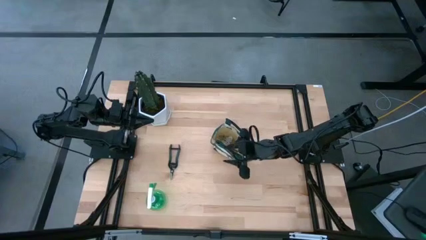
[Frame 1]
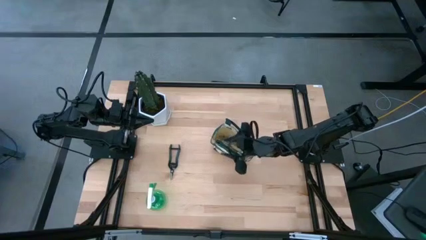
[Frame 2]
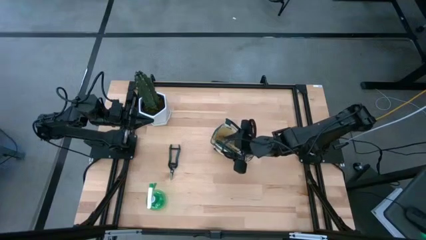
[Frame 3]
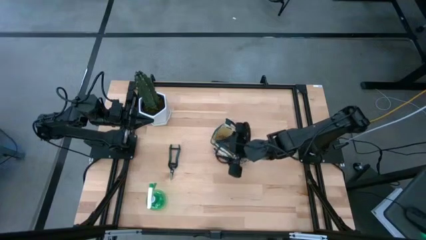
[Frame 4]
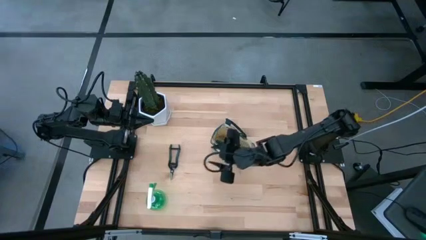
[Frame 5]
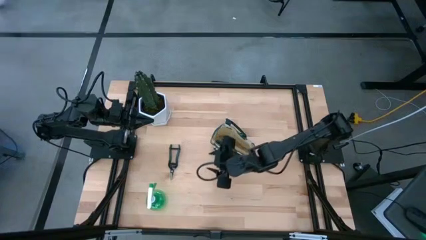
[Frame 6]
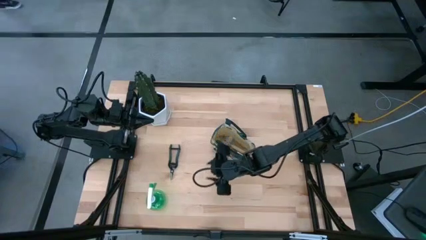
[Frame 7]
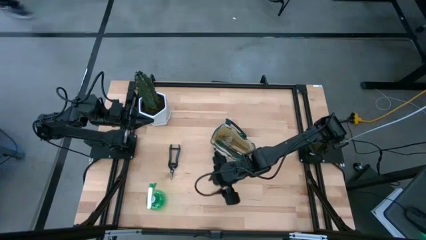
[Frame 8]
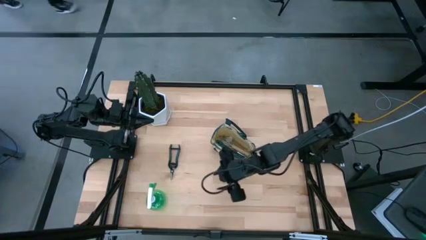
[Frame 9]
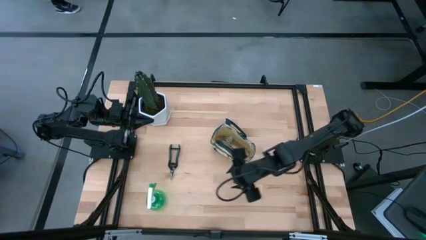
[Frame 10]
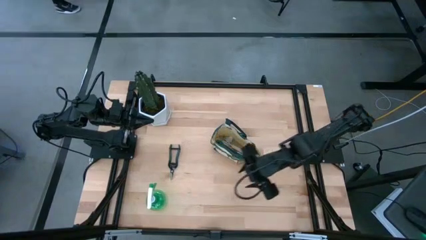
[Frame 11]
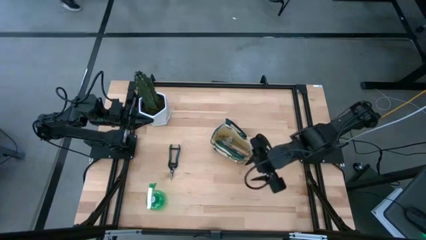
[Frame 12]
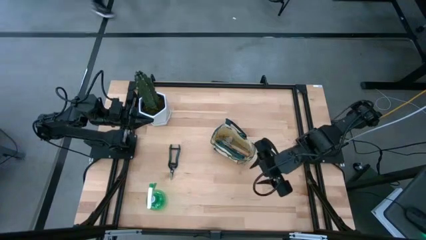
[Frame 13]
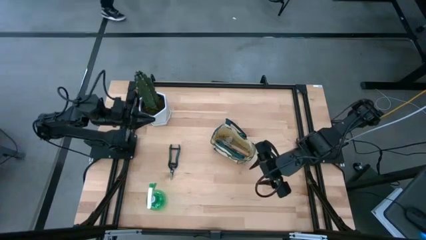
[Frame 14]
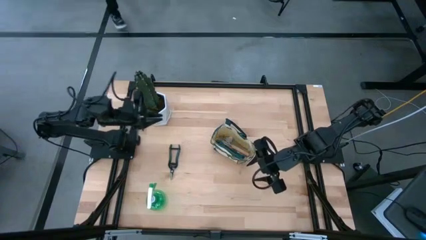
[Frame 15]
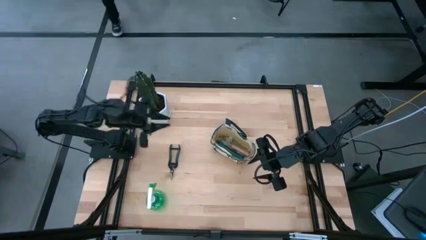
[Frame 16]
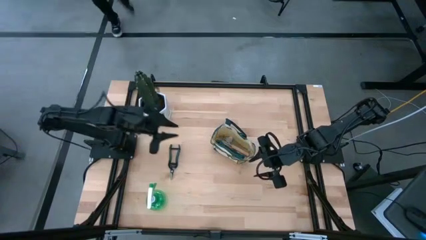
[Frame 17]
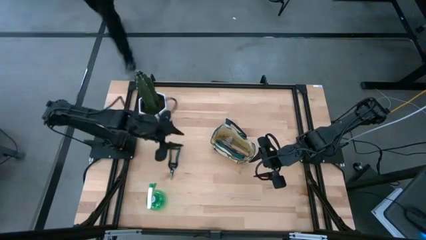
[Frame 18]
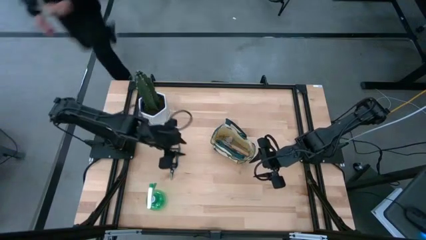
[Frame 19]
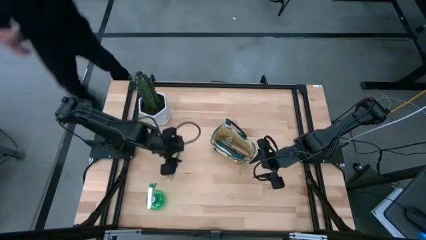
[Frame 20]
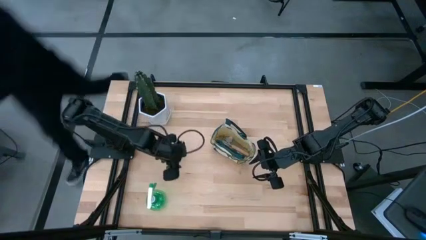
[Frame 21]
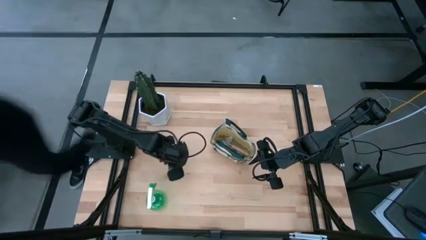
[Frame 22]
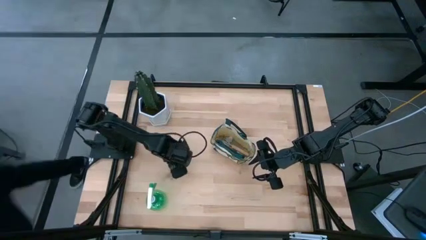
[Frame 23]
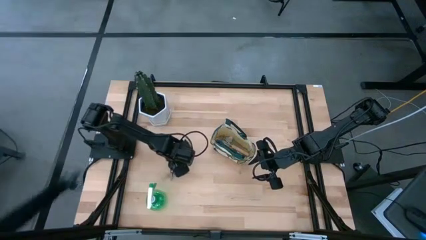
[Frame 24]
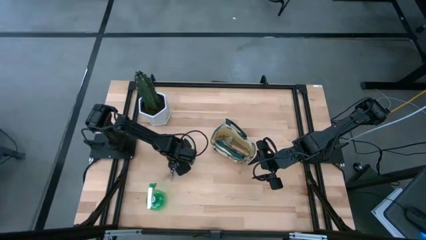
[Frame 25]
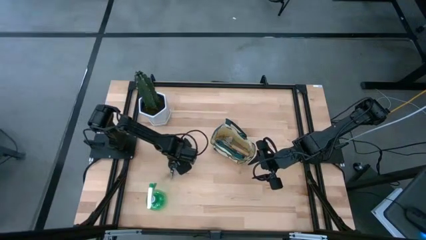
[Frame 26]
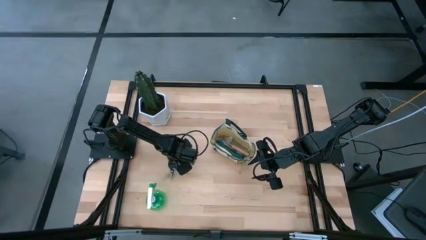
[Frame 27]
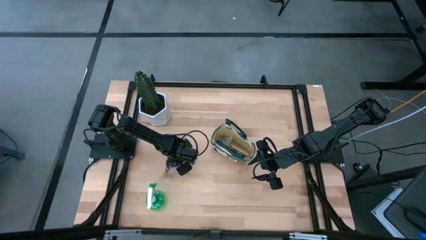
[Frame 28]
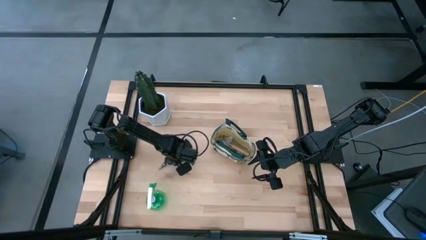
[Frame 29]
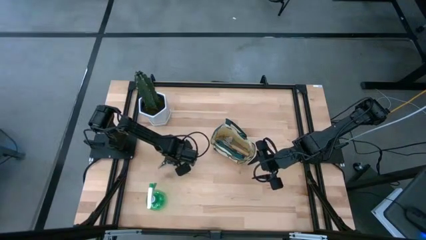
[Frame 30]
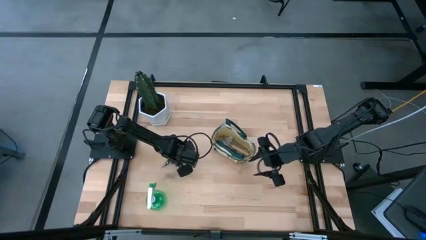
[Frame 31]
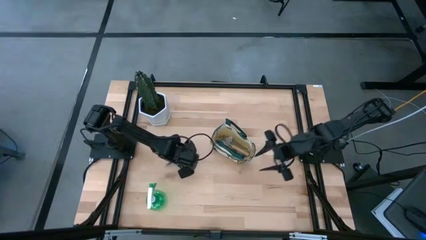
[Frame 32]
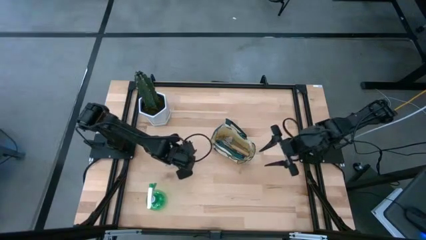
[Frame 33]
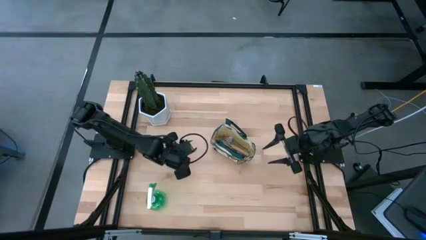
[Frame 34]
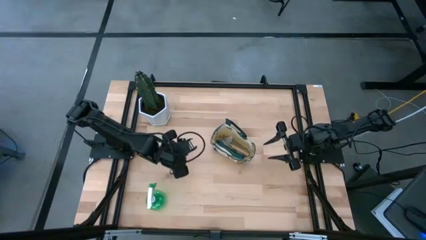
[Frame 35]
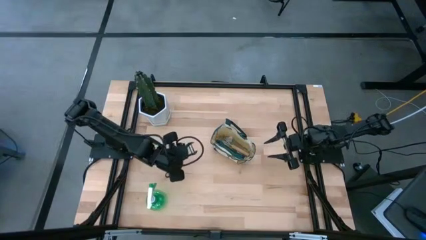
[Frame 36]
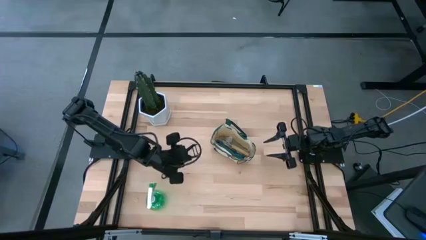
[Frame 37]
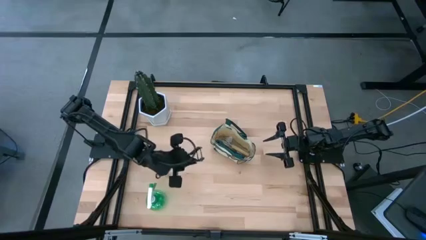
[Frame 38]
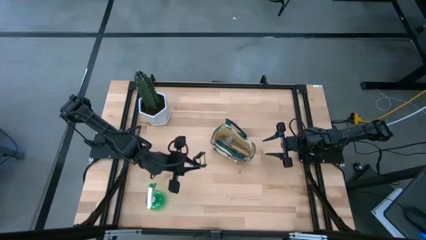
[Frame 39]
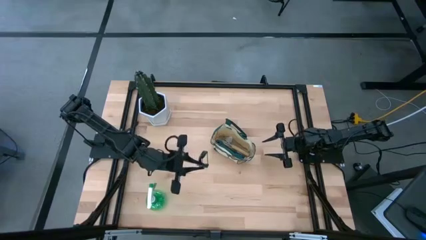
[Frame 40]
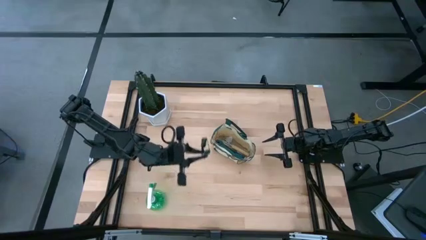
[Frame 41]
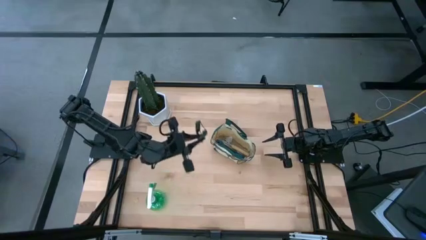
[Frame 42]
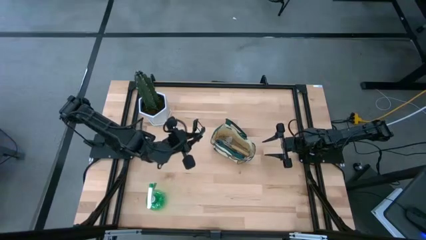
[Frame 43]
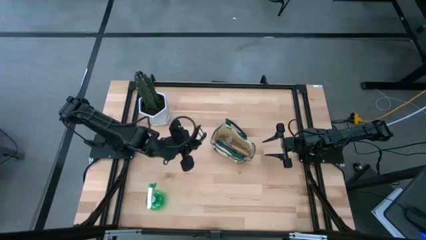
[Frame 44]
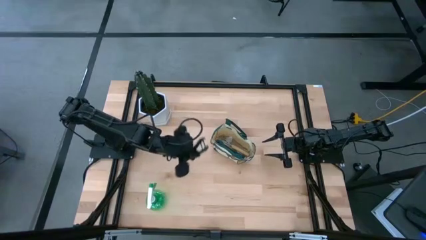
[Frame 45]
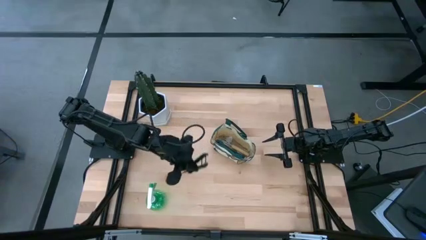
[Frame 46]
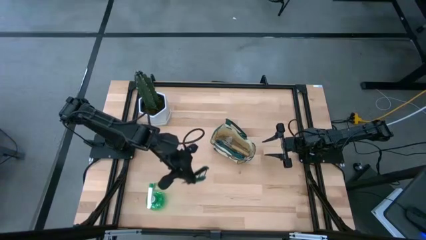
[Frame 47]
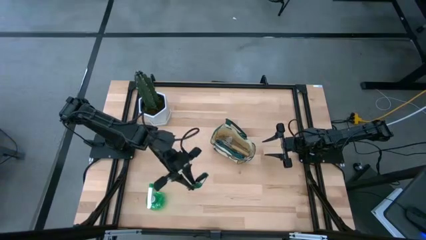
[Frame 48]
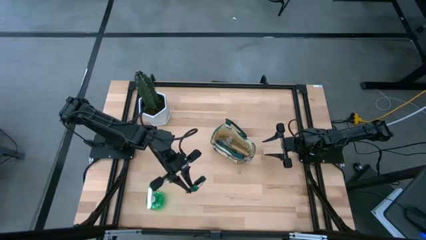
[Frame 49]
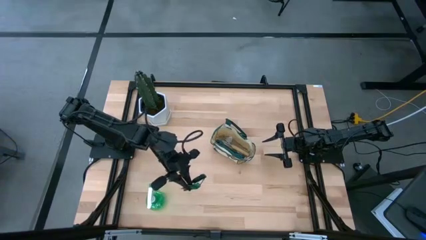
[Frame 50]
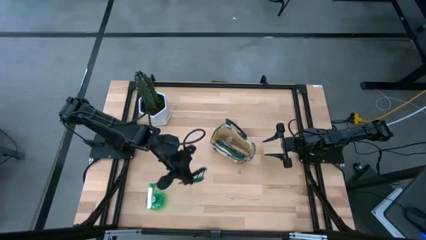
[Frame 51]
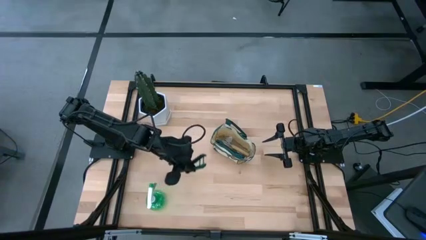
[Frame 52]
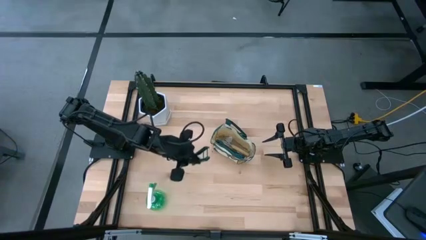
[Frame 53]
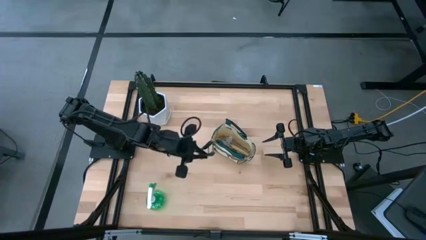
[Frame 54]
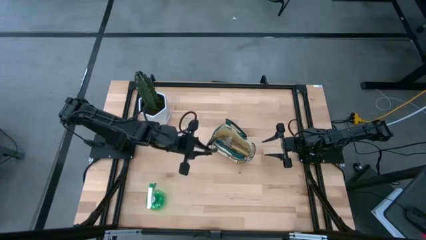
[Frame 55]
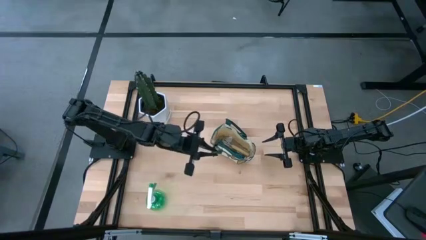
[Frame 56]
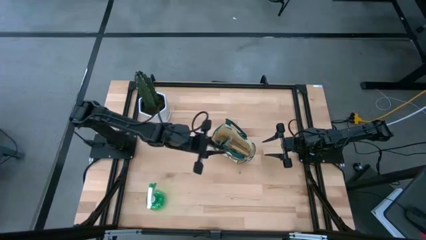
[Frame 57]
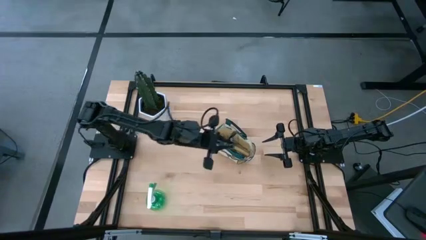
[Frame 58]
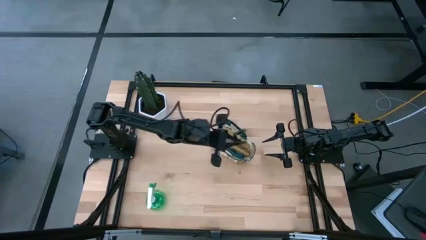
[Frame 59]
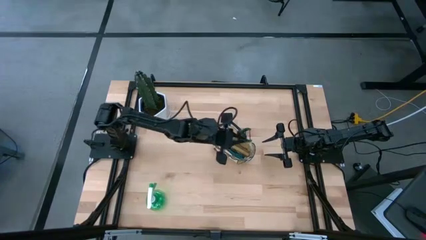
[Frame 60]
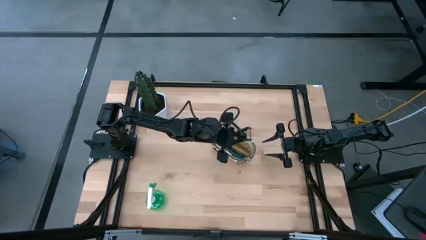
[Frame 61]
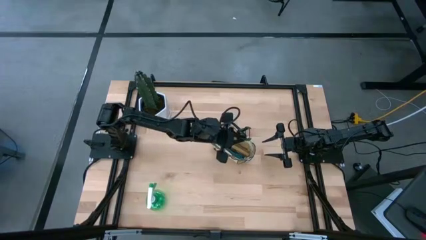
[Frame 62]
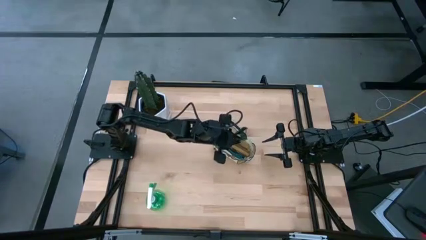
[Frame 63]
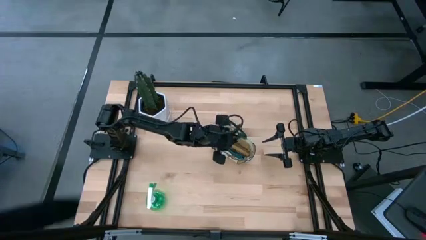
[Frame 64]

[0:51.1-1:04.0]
Task: Pick & Place Garden tools in Gardening bag
Put the green shear scissors into the gardening bag

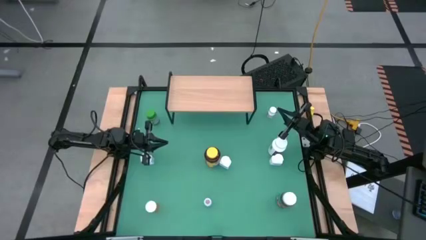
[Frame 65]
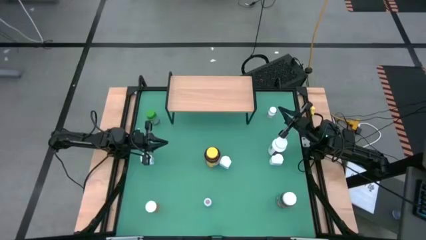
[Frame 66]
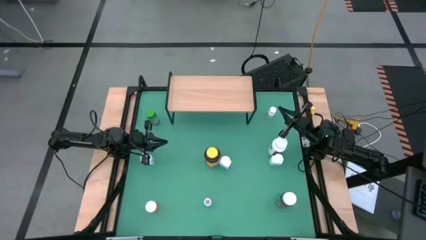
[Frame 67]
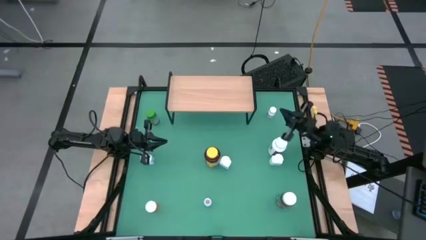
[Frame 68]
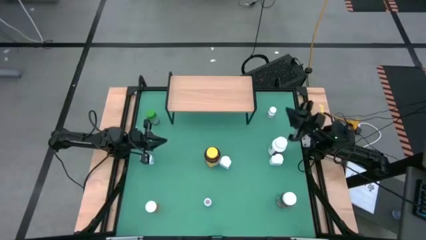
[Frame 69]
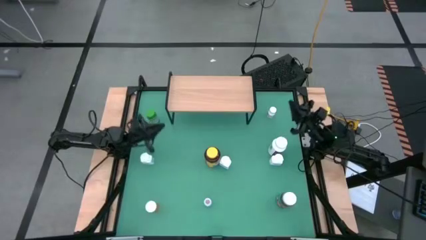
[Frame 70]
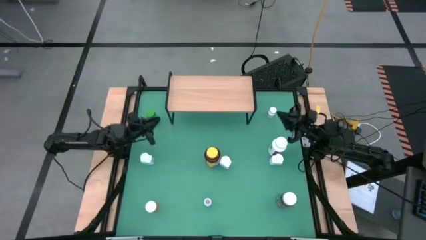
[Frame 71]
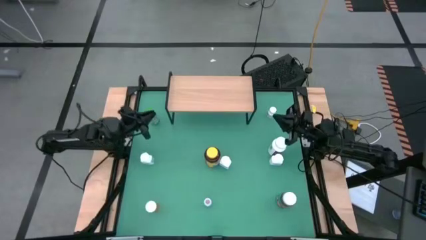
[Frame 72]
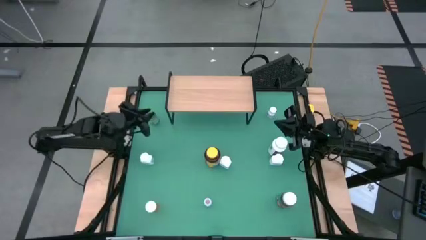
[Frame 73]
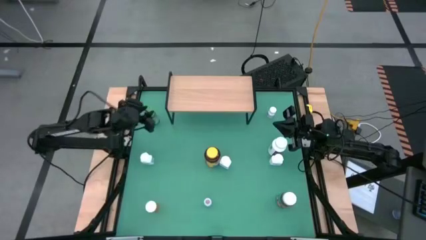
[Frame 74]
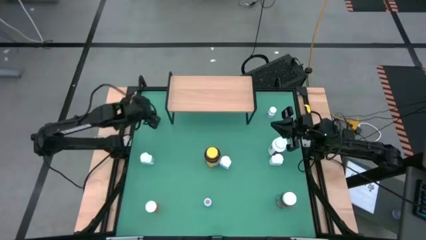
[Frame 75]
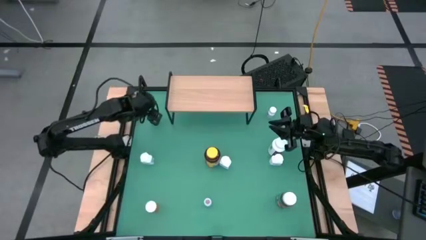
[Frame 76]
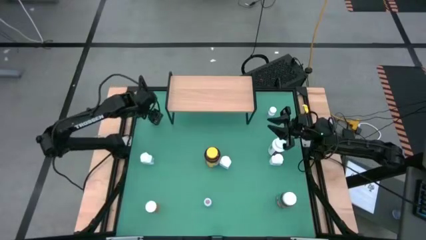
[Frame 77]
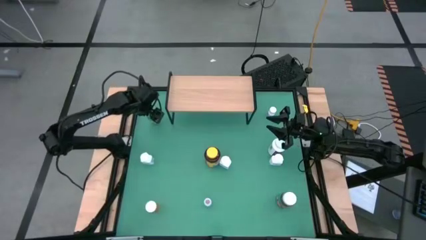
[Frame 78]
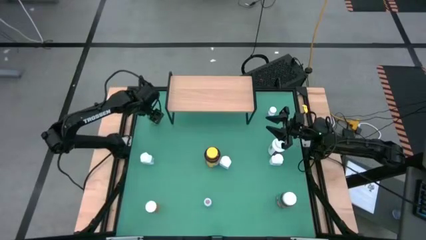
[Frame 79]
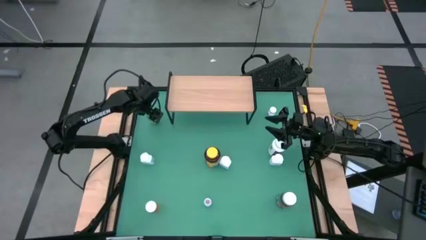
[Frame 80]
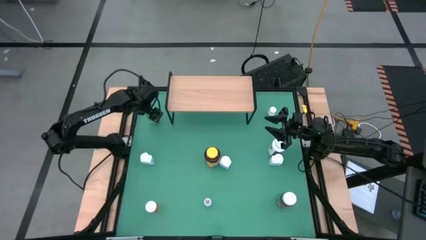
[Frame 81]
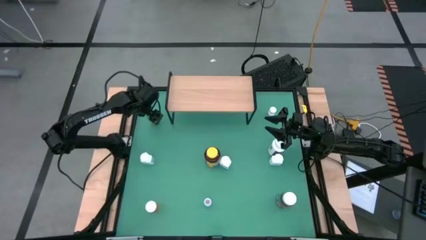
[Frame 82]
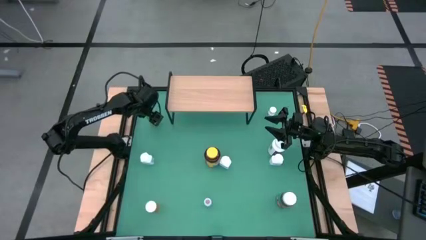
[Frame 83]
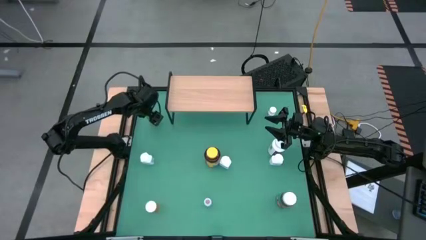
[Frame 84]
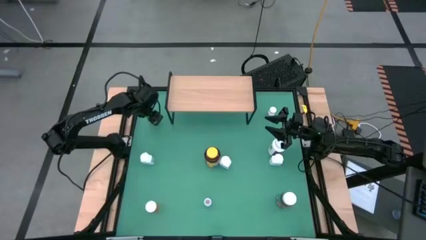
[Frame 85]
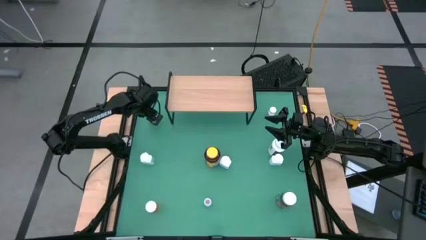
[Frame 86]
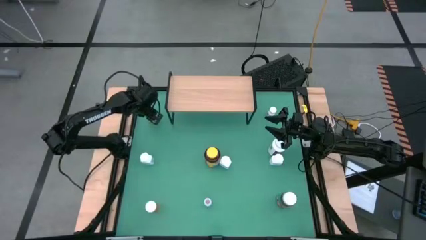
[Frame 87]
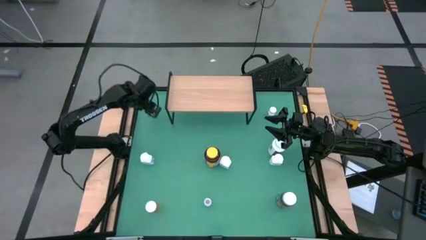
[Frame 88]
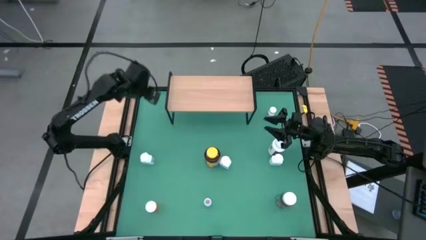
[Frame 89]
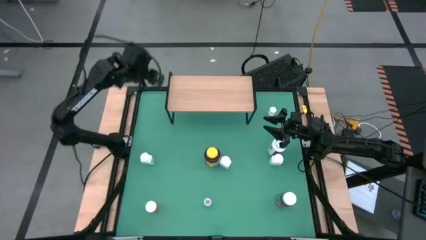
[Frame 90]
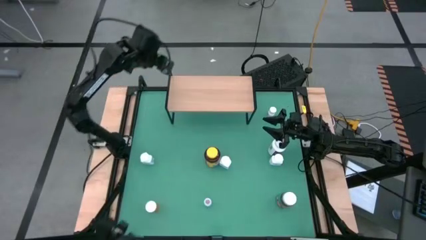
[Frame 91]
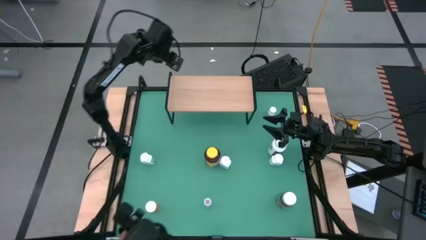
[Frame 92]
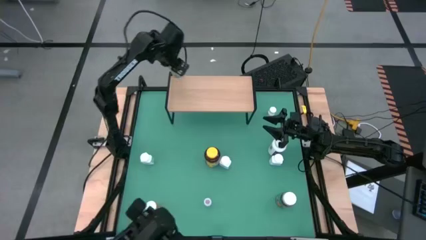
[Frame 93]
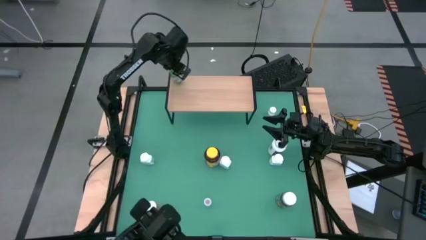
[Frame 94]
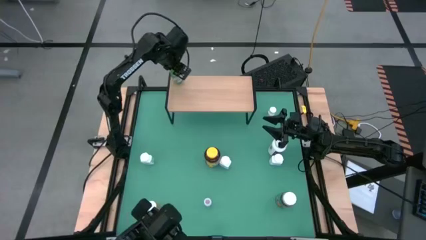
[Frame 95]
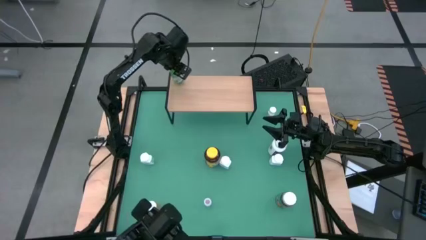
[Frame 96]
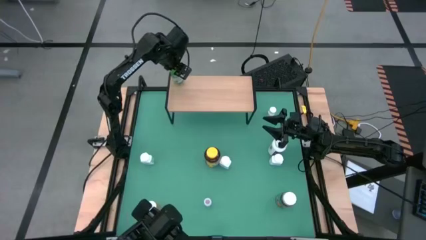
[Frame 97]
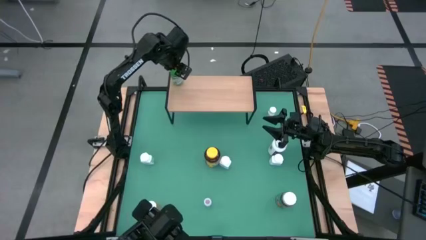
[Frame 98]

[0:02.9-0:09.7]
Task: Pick and place medicine bottles onto shelf by color
Put the green pill bottle on the shelf
